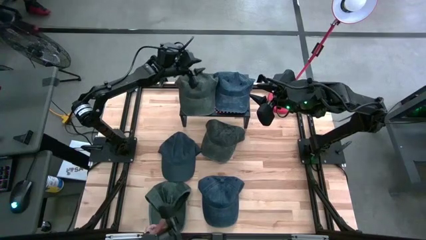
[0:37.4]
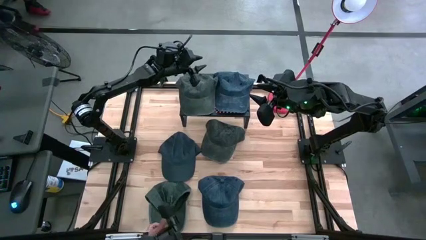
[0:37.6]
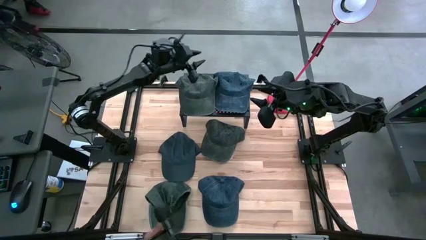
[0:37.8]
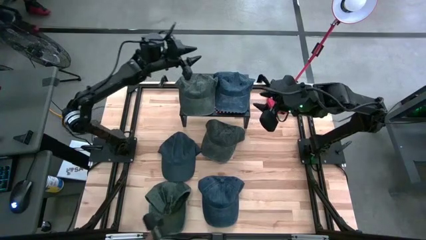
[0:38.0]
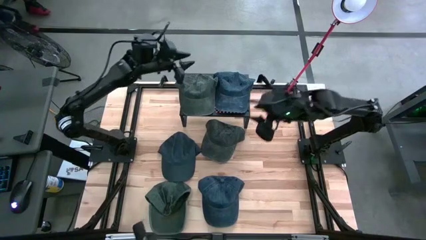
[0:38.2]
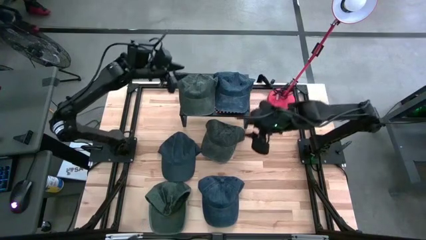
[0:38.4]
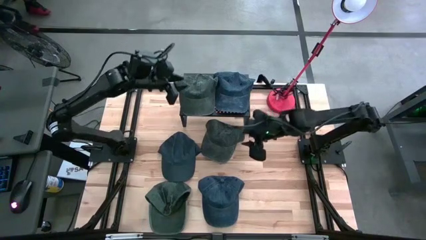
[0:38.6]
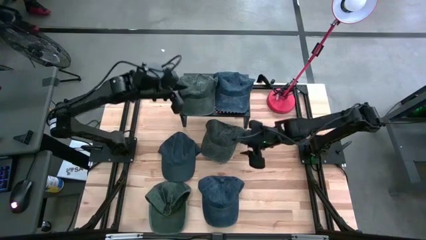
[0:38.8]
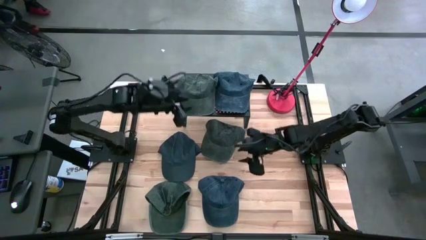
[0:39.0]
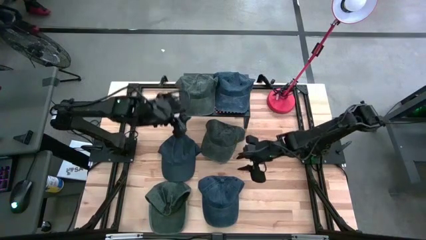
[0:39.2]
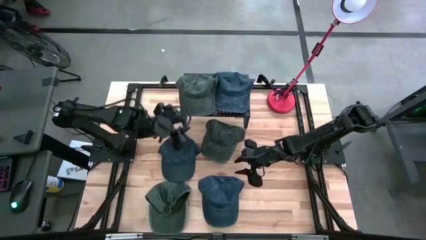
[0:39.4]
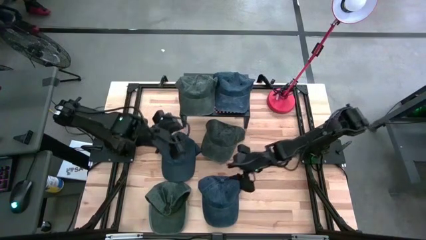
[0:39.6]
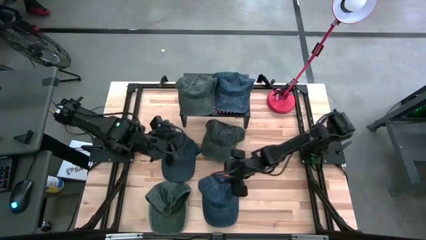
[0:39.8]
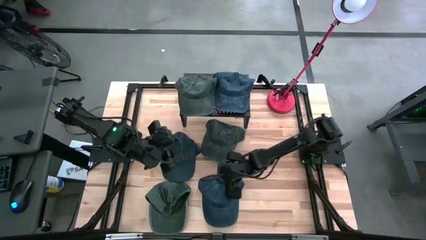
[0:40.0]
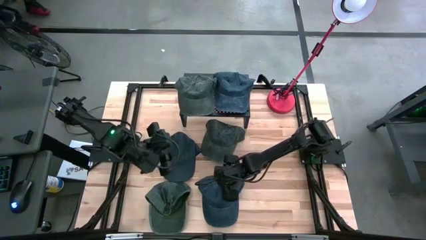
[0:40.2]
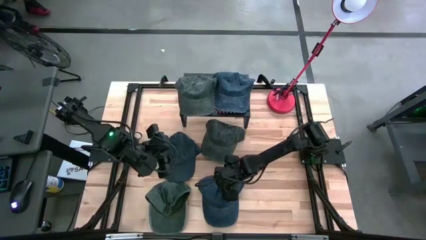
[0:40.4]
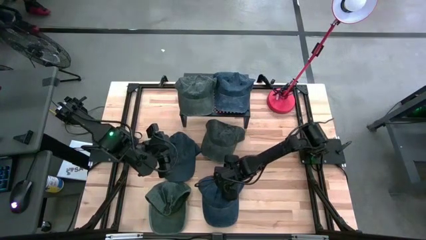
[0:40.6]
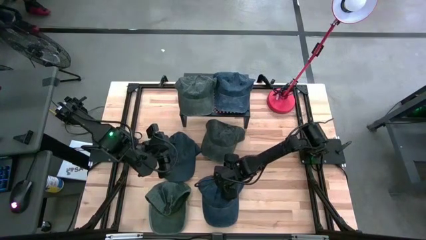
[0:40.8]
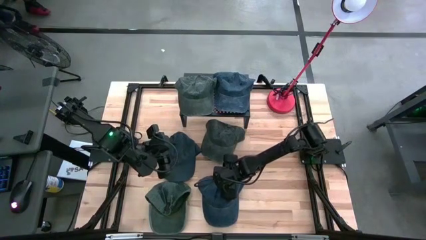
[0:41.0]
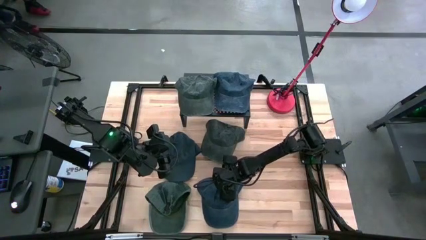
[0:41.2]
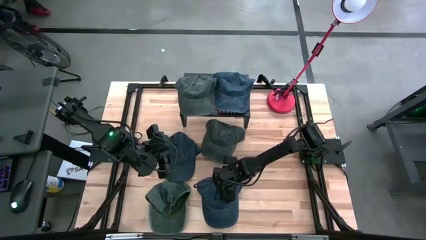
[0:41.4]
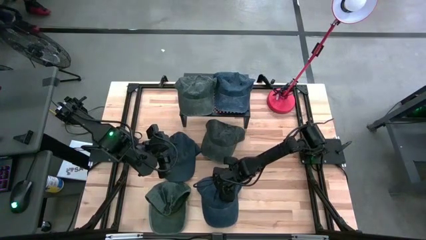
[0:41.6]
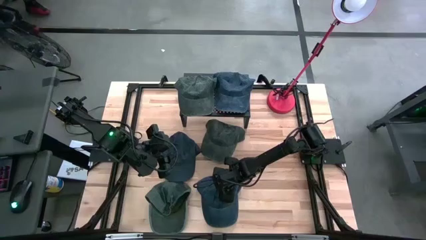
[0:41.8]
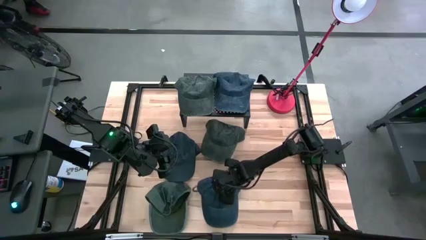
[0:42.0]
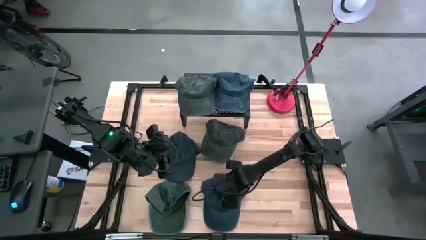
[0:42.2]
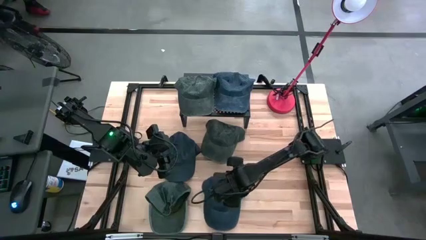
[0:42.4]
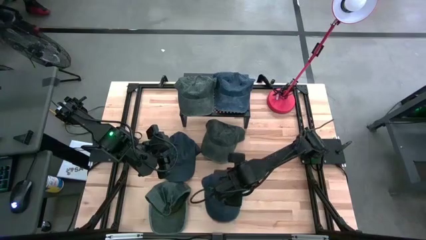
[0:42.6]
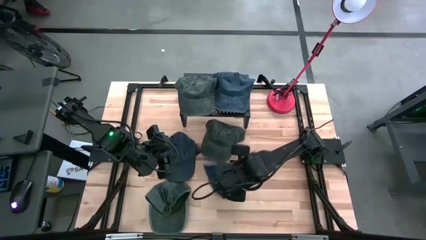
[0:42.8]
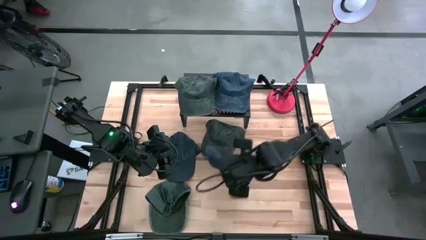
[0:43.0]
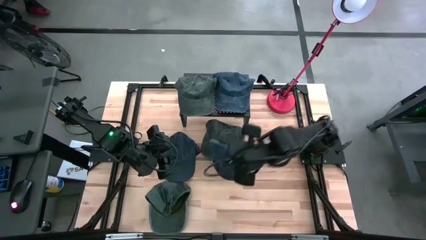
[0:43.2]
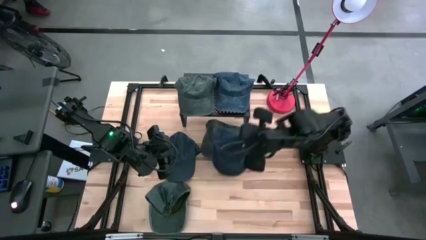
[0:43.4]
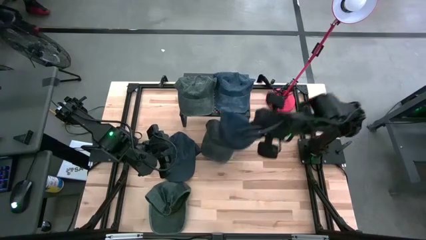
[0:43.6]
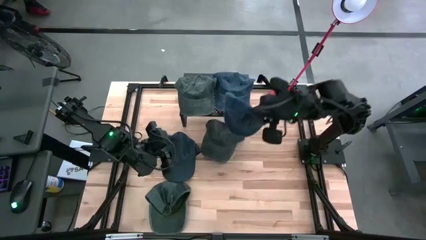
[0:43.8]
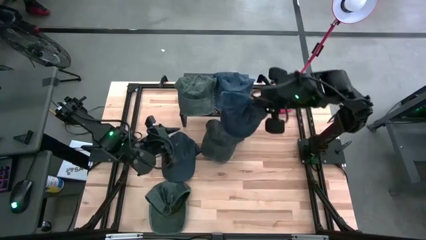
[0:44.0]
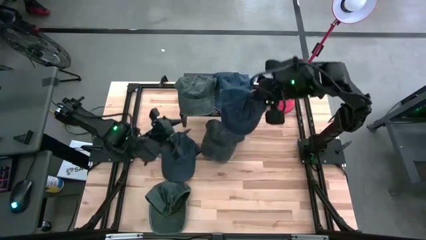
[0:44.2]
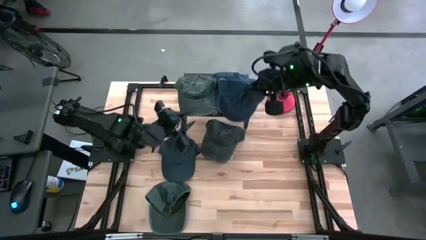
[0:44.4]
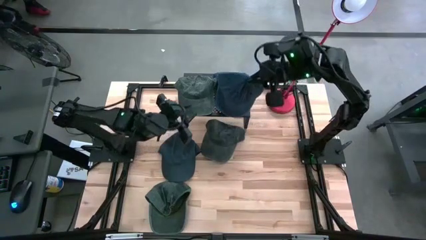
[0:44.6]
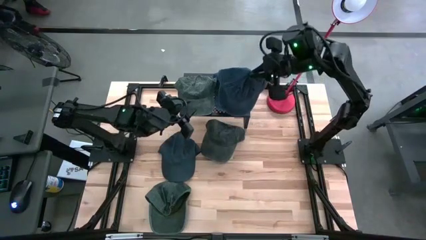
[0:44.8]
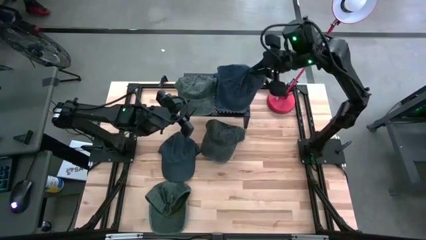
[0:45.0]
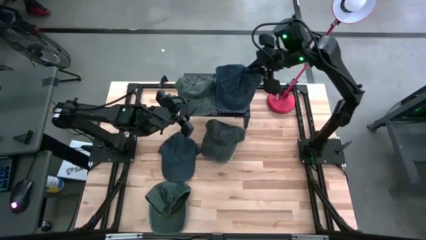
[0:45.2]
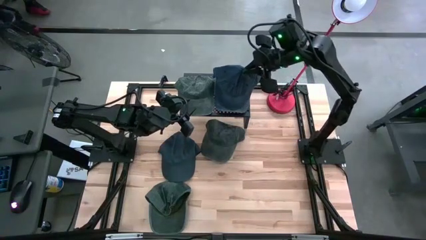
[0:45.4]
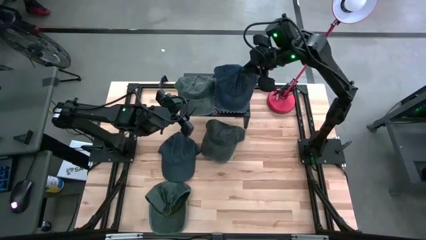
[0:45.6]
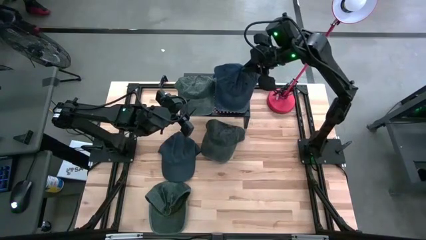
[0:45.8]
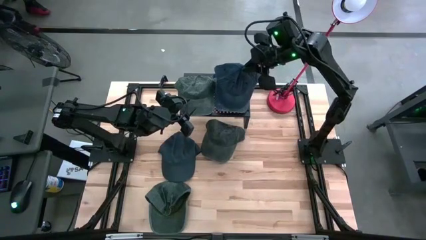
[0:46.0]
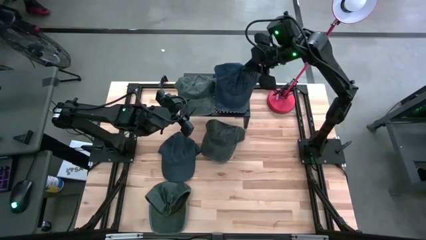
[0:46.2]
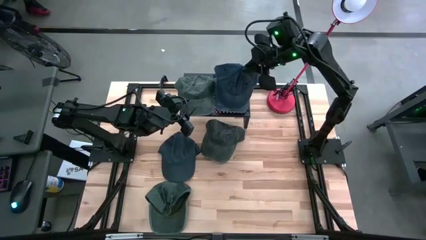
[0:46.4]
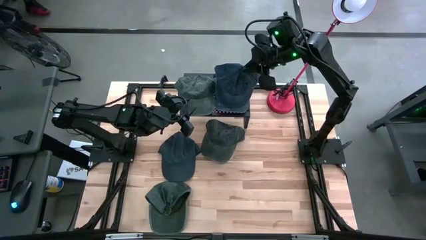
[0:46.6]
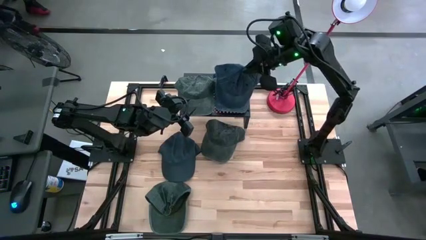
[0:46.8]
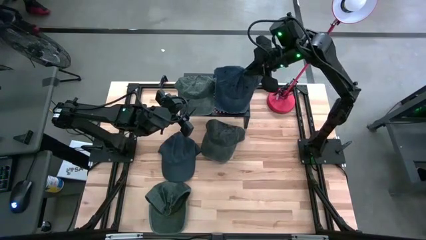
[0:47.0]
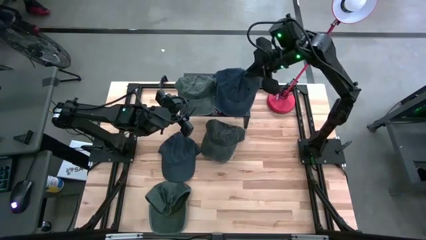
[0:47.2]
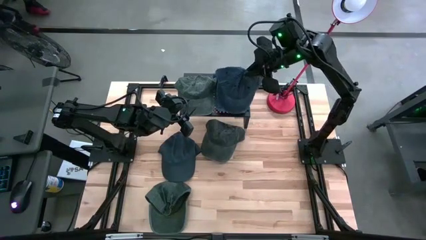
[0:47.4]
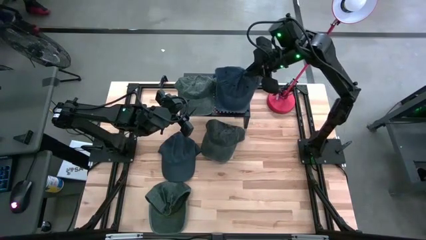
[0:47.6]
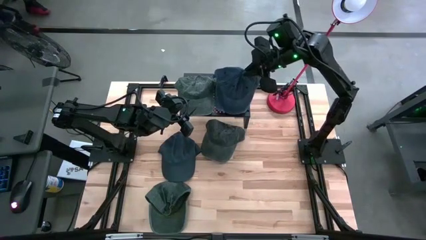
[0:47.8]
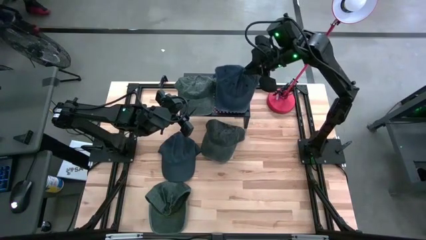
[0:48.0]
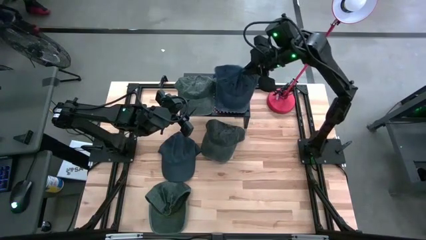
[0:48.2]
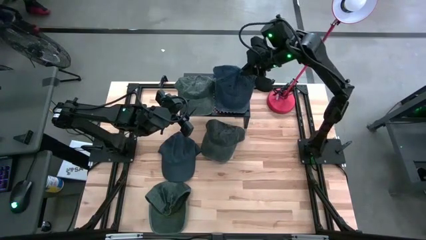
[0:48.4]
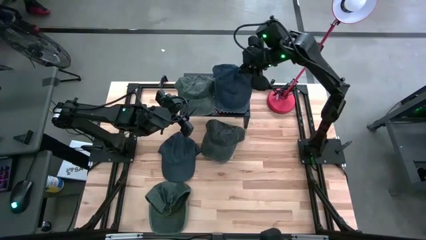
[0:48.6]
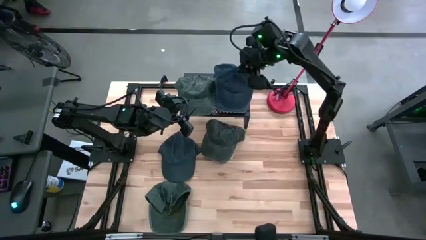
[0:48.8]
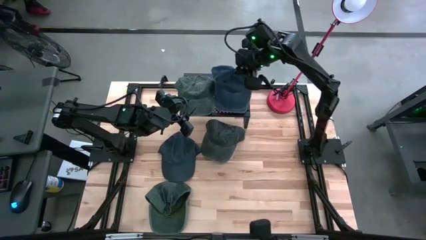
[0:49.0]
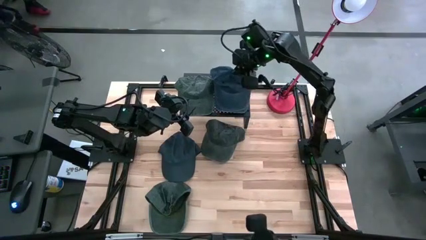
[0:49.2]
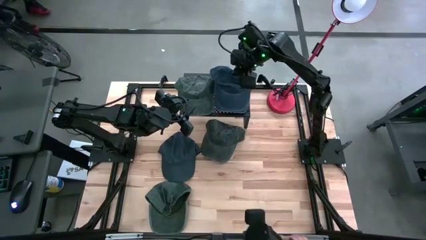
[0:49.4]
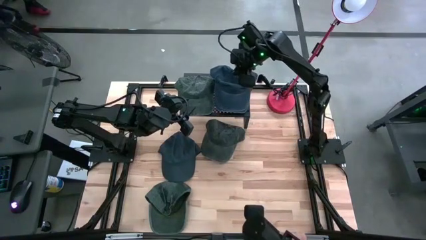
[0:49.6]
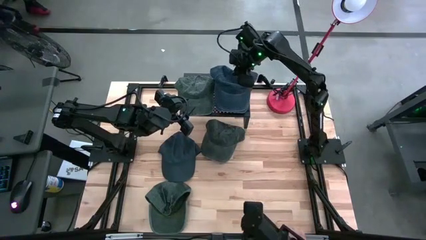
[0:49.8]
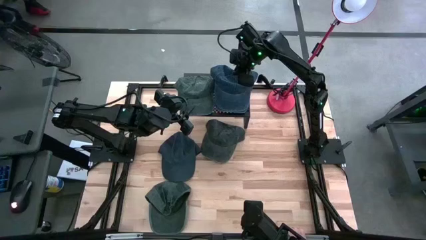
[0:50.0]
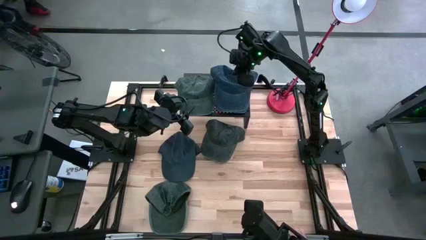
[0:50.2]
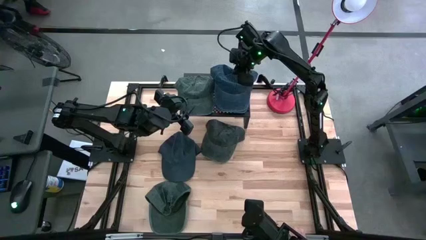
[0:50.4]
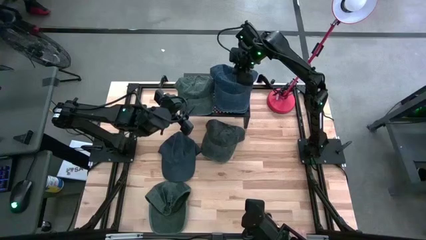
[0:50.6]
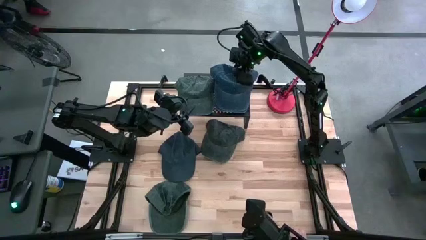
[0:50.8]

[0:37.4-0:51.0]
Task: Pick & Place hat
Stack the bottom dark blue cap on top of the other dark blue cap on the shelf
